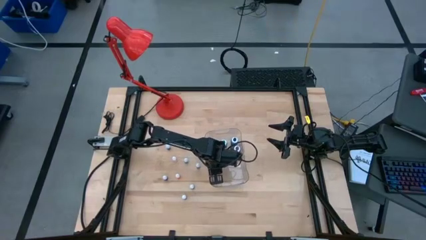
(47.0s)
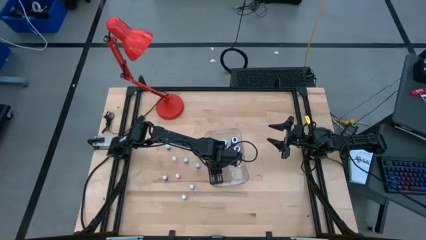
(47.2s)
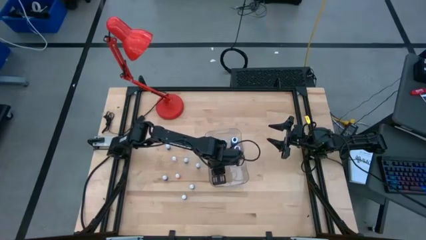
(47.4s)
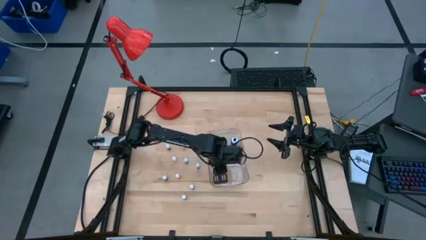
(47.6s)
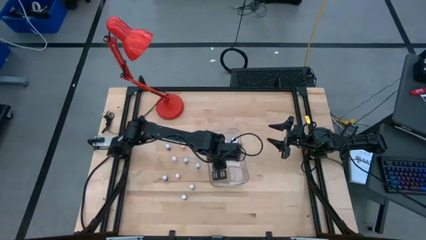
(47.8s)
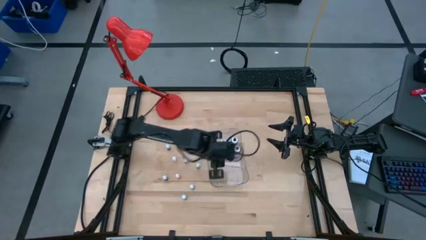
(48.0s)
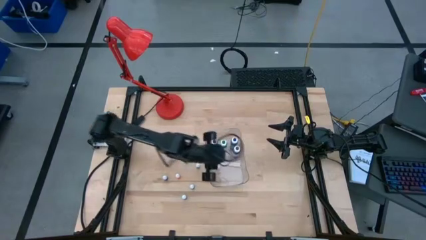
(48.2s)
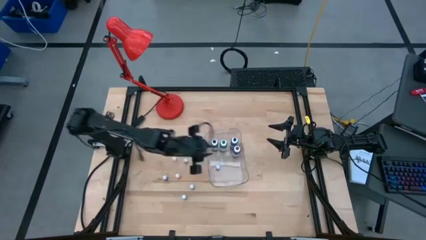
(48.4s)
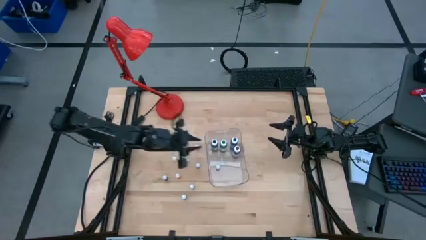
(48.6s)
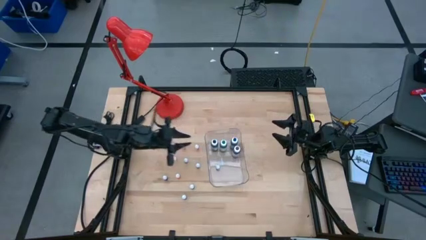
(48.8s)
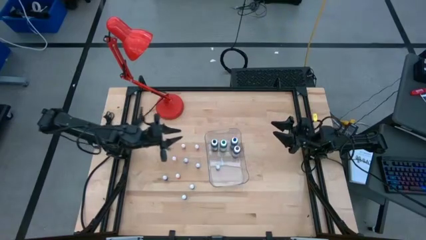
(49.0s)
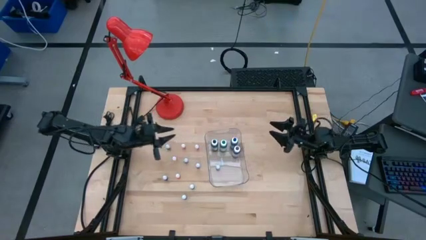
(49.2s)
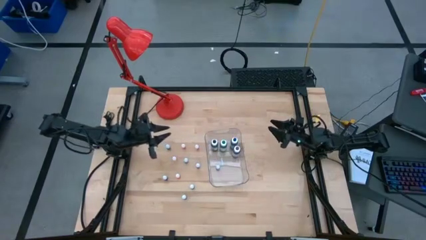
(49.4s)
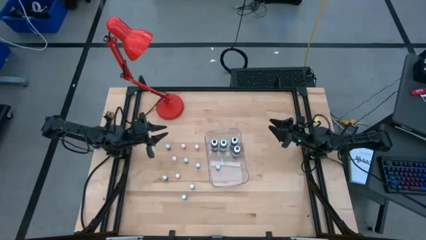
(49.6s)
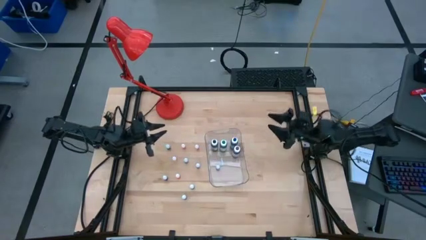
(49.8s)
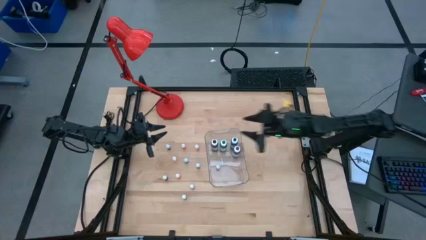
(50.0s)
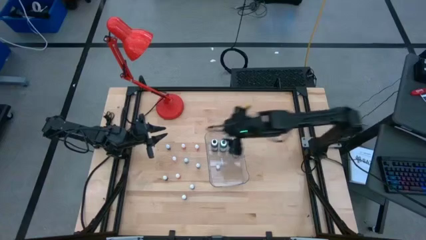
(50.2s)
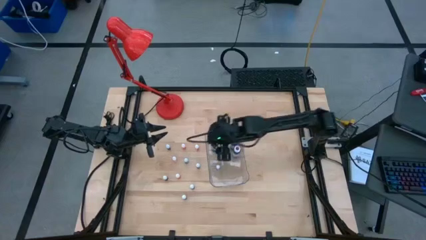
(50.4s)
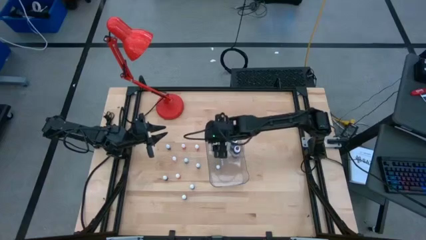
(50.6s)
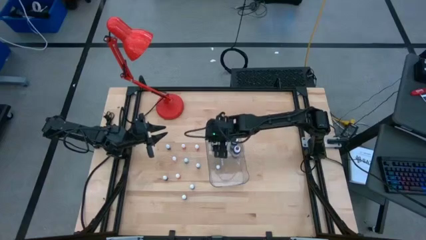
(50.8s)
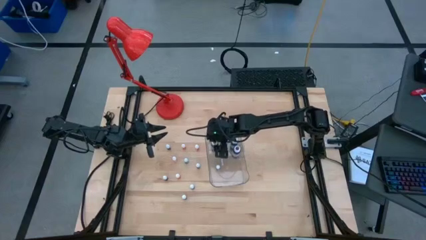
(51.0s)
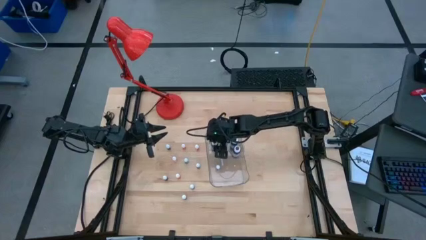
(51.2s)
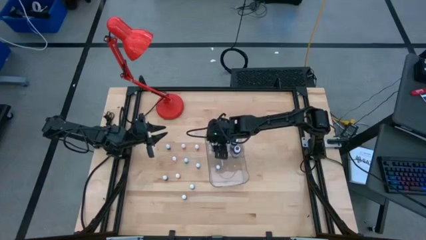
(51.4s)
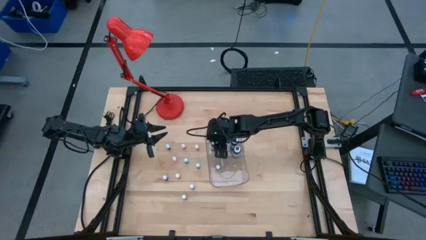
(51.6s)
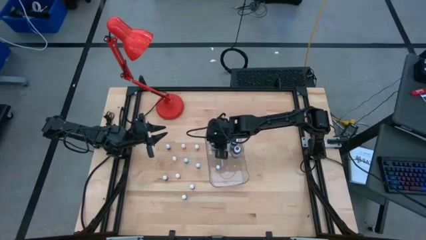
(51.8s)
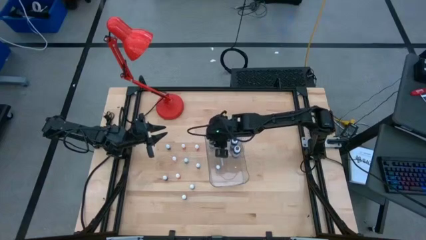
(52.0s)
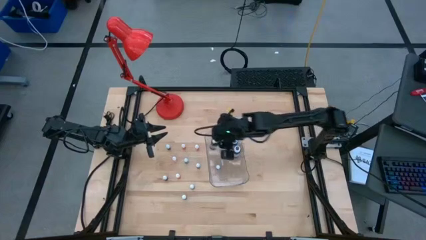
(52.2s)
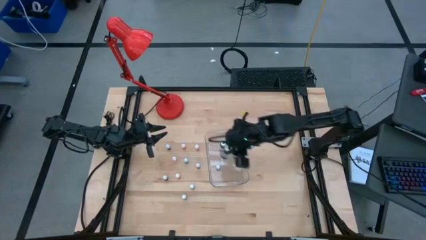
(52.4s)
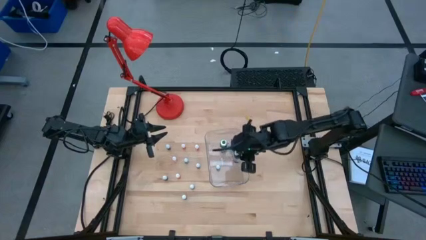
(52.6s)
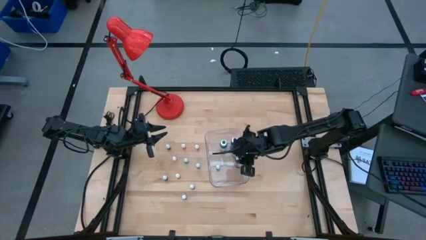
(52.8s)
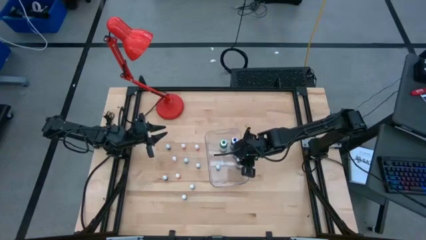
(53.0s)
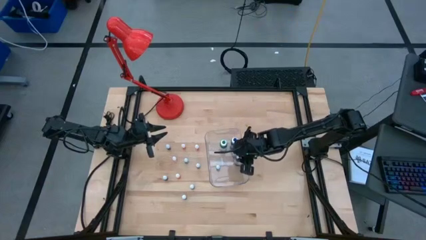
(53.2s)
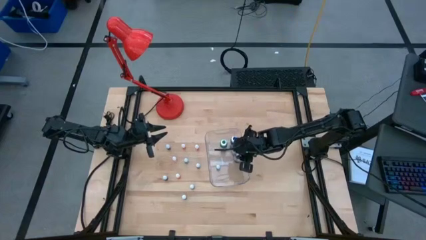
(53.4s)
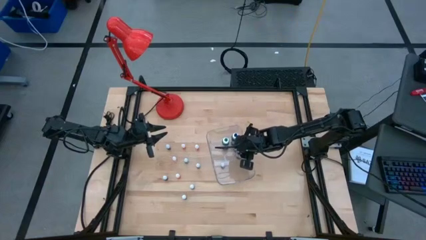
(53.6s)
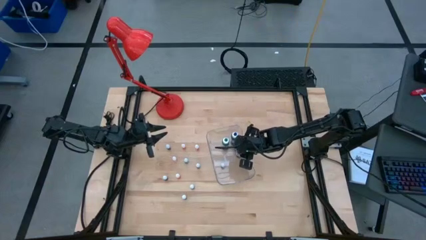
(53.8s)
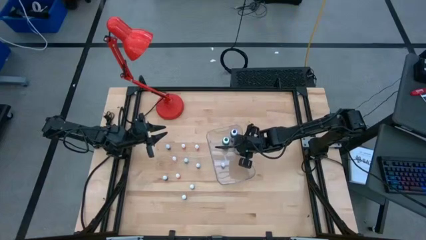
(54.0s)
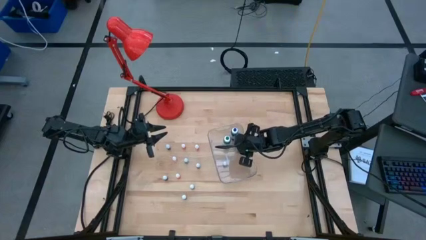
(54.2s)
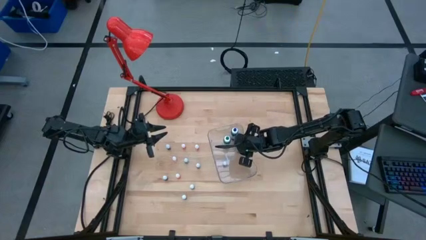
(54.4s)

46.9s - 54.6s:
Task: Pick & Place food coloring
Move the black food coloring bottle beside the purple food coloring bottle in the container

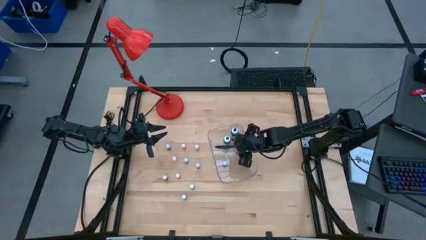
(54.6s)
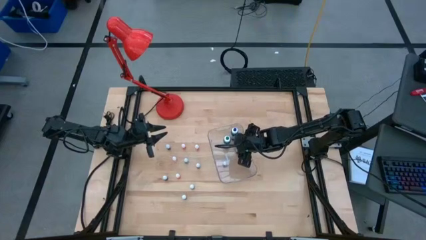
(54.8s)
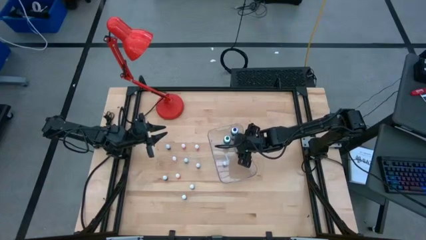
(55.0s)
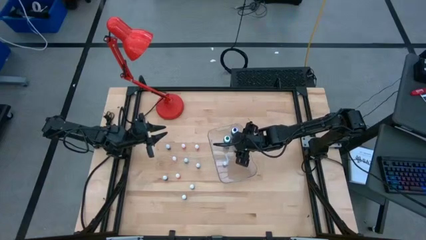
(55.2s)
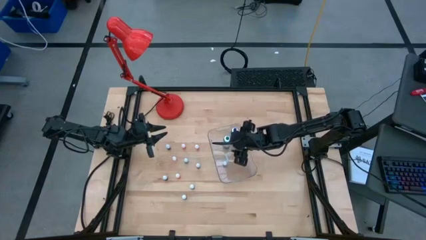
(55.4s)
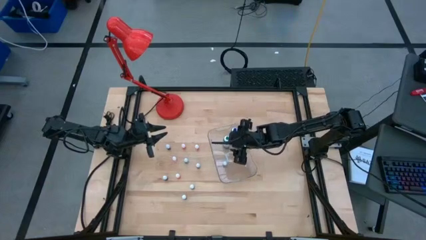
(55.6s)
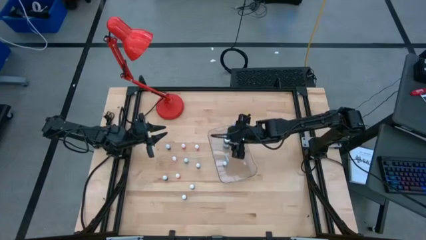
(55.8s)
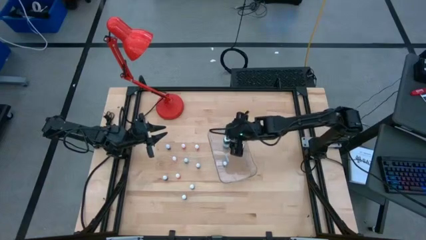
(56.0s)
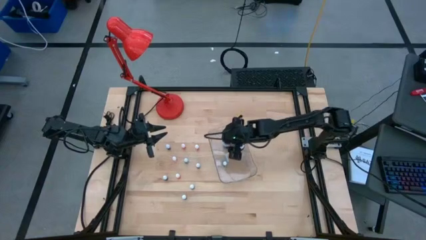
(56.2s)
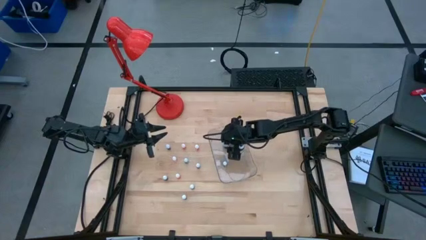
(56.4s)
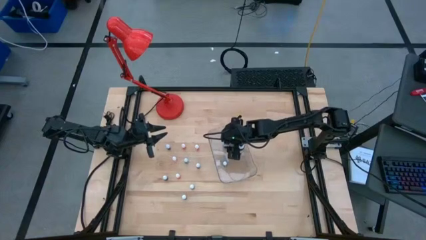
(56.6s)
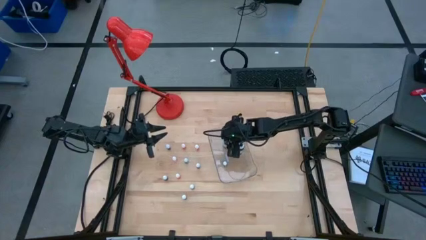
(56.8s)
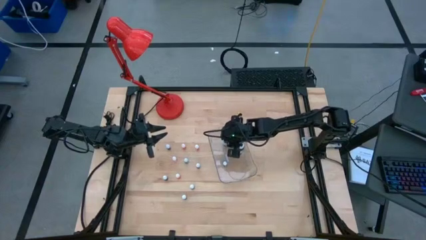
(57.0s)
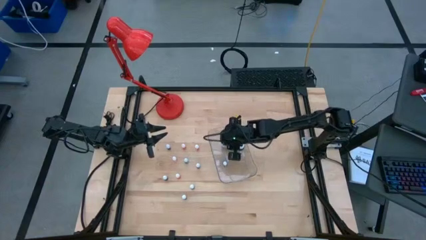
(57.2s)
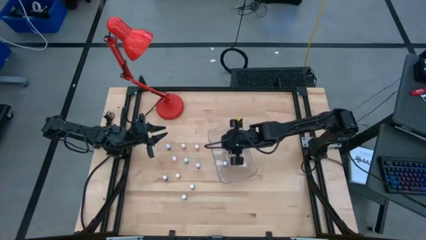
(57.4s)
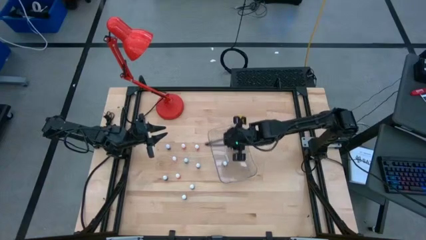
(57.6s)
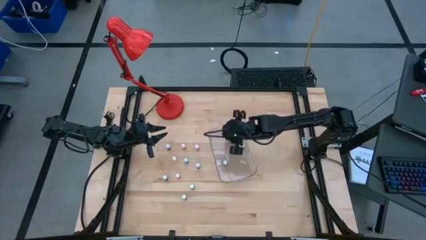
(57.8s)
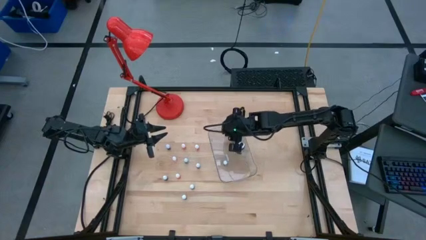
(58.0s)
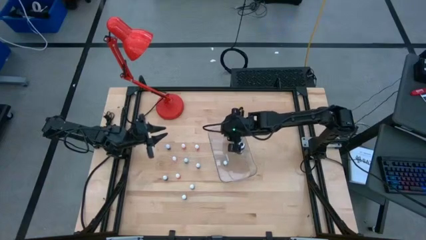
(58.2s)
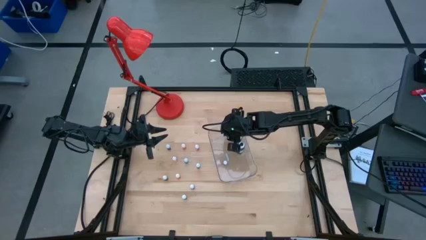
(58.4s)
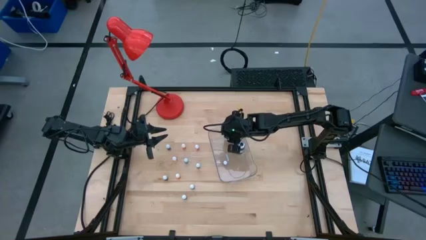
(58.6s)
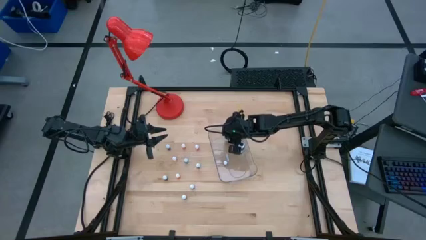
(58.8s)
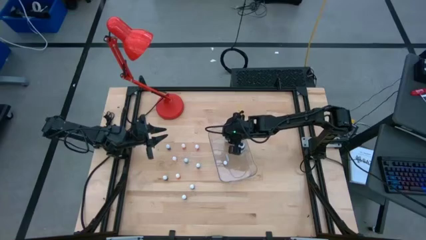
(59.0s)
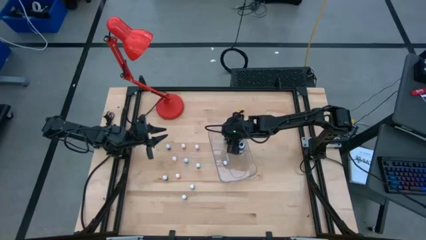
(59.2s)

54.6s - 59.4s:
Adjust the green food coloring bottle inside the container

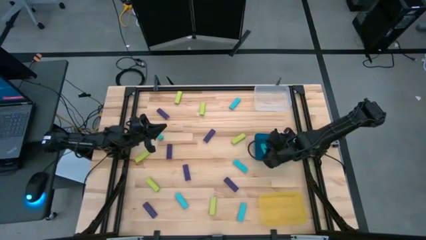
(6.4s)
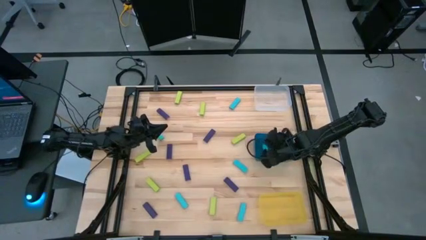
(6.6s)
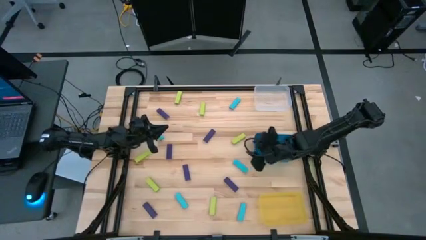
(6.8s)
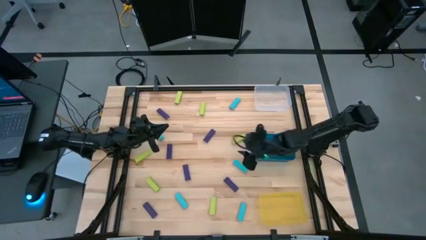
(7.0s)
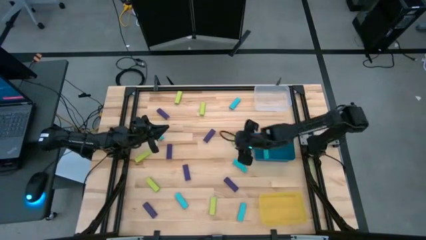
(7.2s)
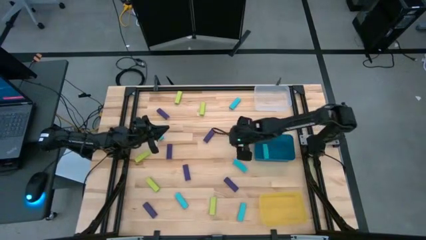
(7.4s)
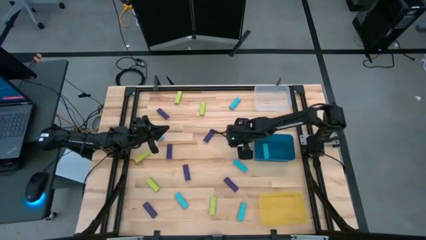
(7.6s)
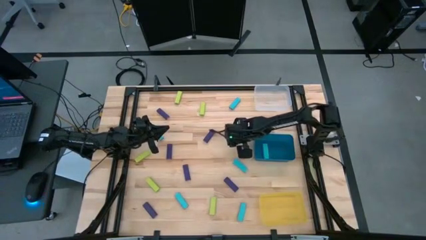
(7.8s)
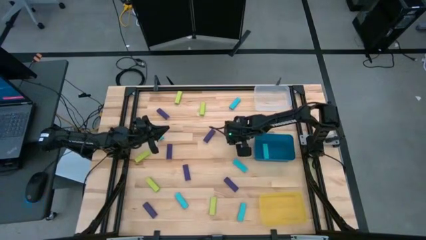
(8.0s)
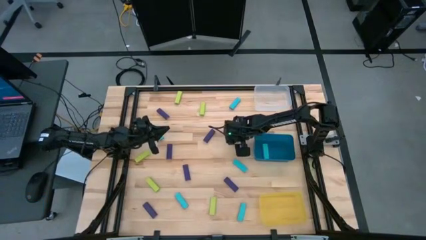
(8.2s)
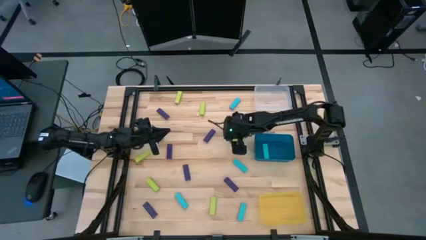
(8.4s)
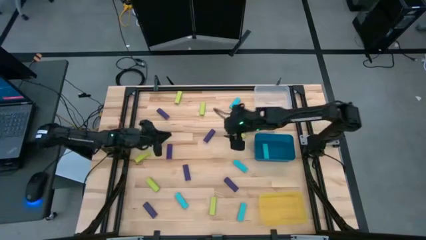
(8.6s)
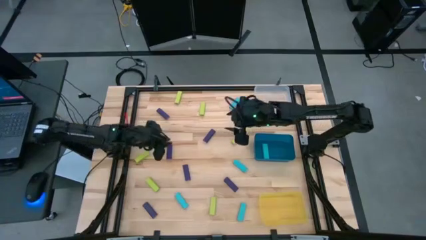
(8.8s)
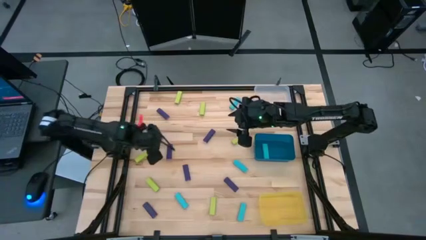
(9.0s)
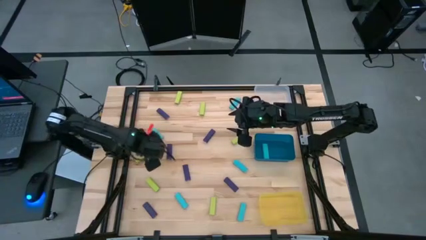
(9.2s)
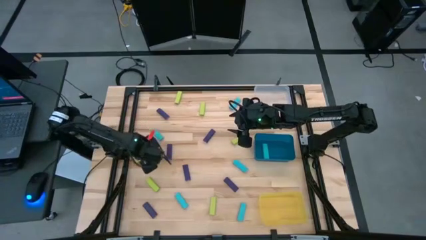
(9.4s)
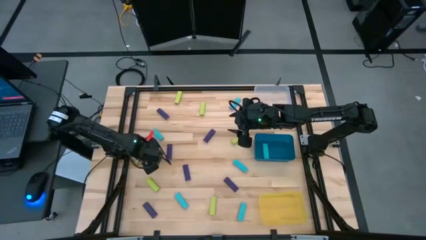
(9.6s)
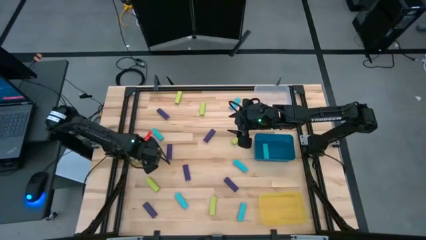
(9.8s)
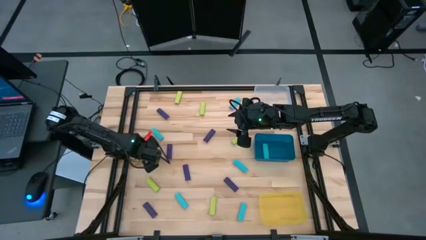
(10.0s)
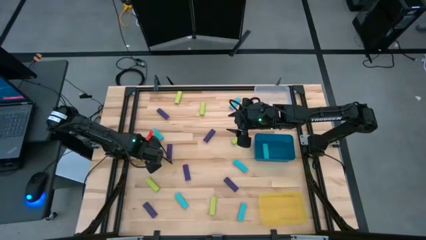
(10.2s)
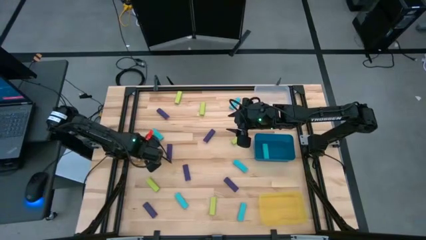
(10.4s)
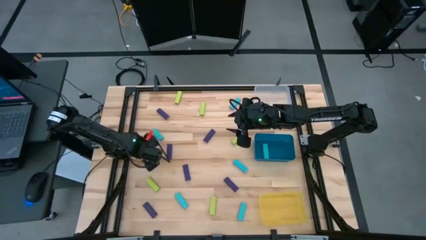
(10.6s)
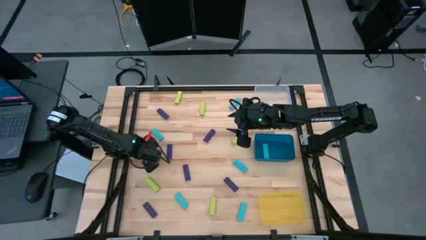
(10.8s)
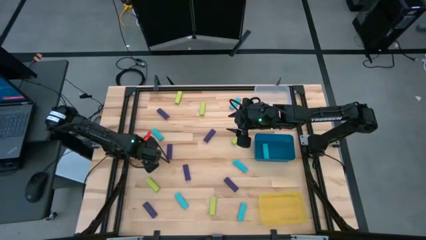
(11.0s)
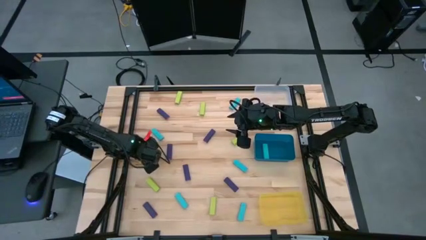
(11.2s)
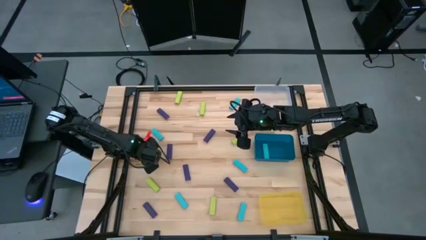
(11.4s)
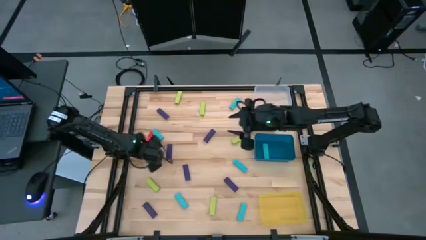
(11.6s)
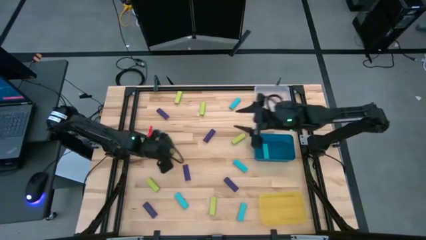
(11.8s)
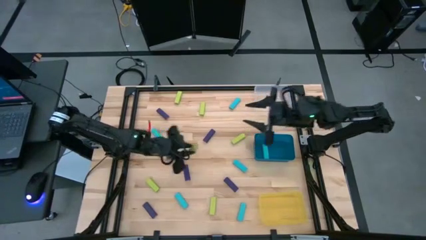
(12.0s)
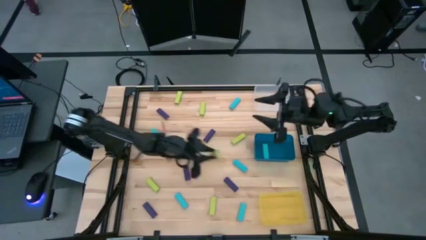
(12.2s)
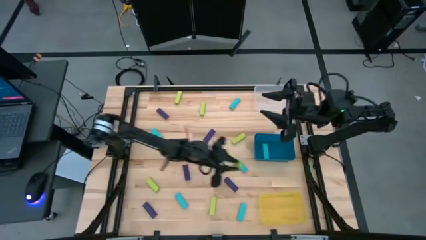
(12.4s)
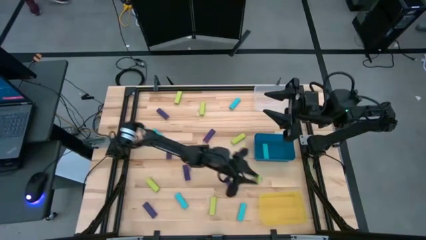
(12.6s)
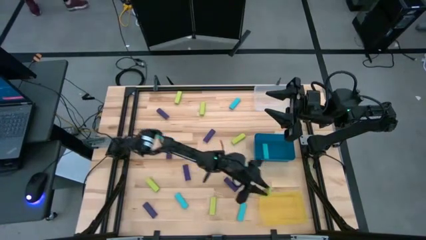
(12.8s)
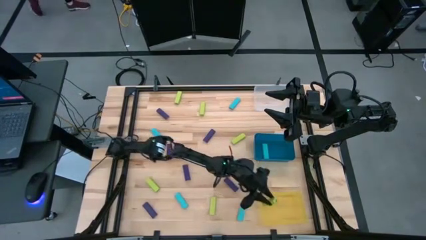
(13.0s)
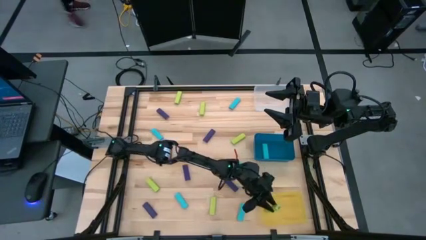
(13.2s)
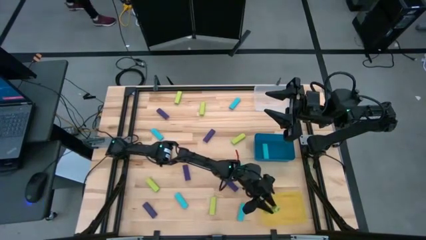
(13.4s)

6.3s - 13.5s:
Task: Sort blocks
Put the light green block into the yellow bin
